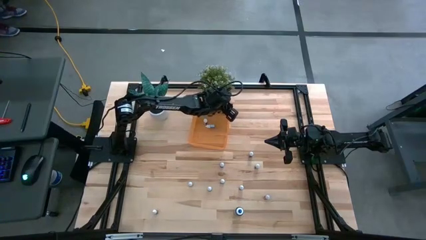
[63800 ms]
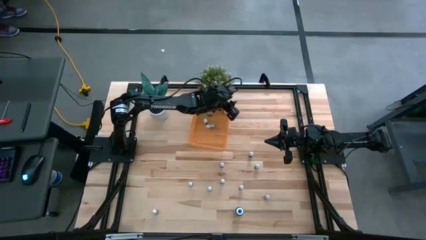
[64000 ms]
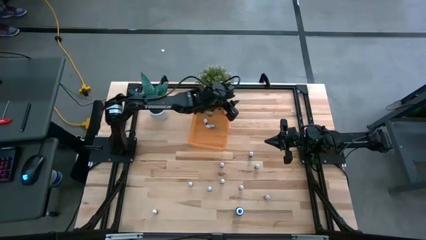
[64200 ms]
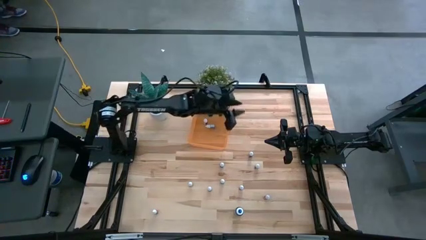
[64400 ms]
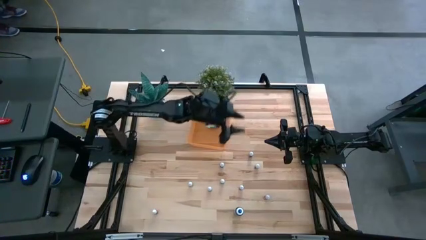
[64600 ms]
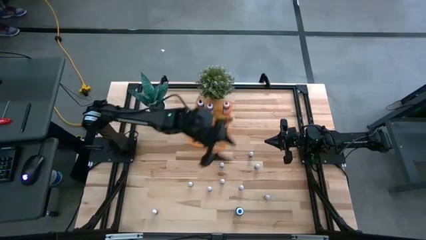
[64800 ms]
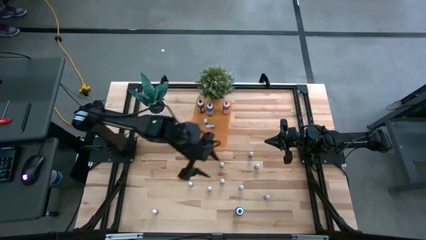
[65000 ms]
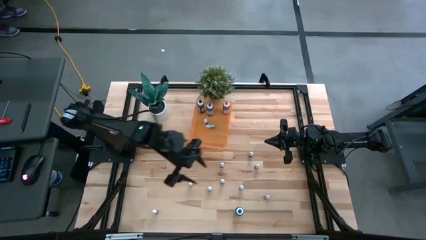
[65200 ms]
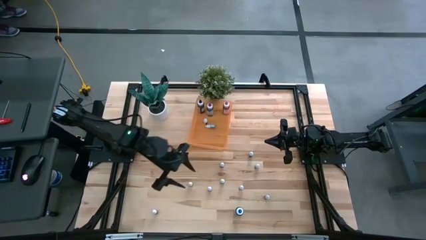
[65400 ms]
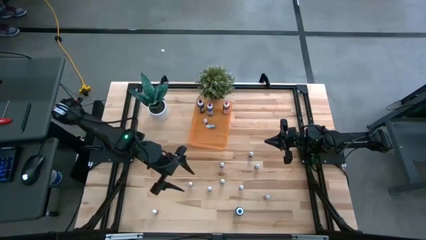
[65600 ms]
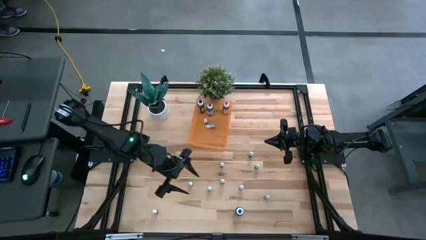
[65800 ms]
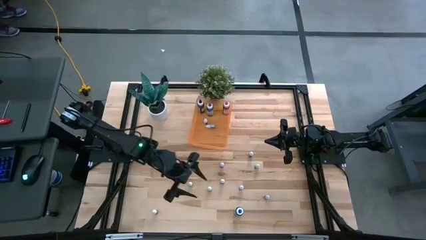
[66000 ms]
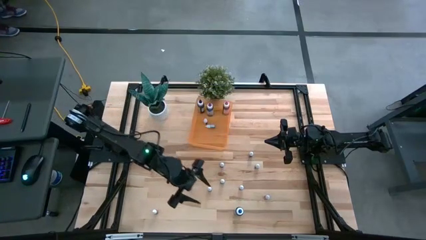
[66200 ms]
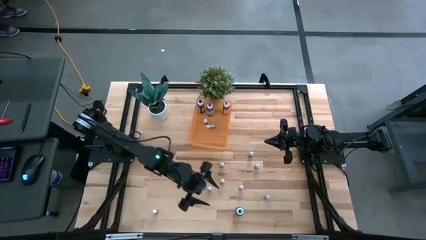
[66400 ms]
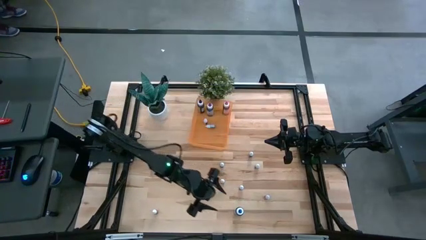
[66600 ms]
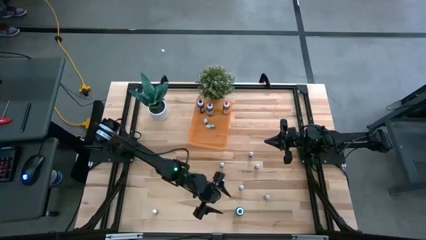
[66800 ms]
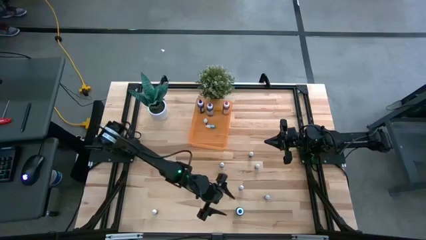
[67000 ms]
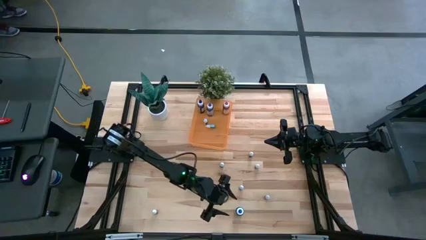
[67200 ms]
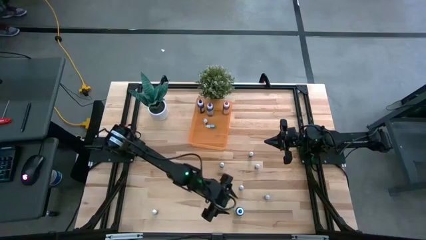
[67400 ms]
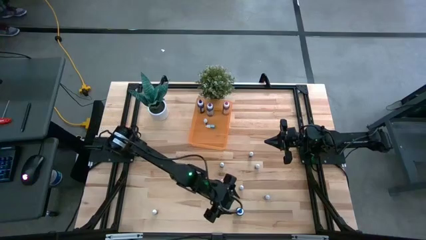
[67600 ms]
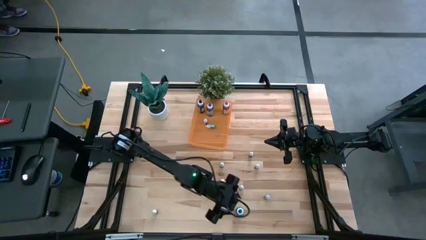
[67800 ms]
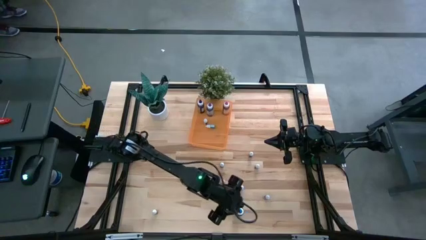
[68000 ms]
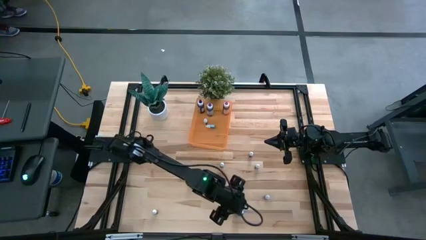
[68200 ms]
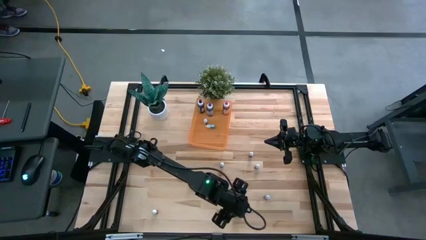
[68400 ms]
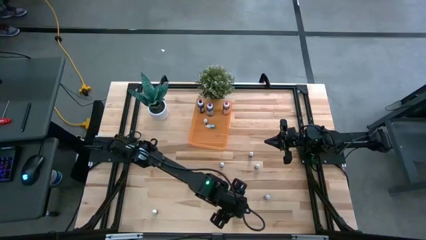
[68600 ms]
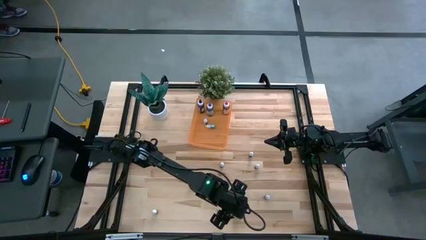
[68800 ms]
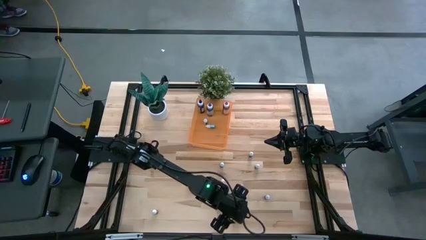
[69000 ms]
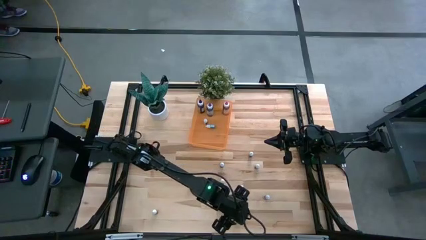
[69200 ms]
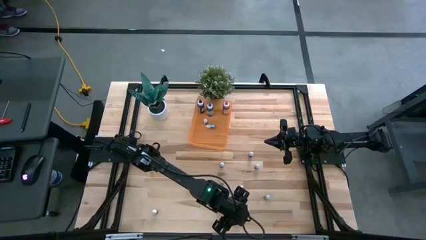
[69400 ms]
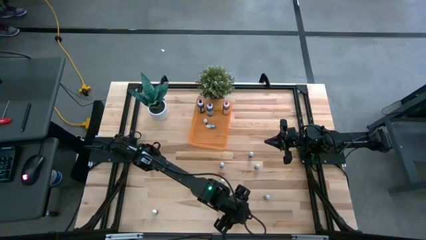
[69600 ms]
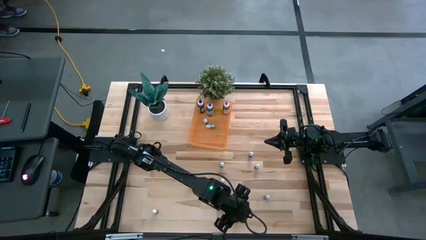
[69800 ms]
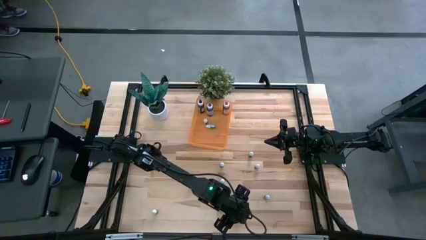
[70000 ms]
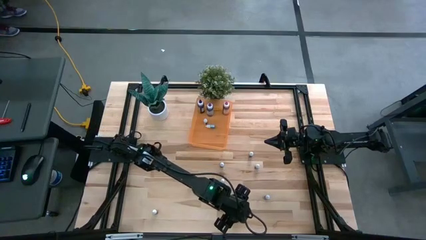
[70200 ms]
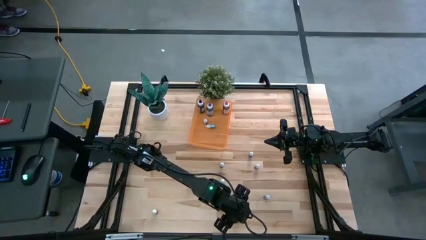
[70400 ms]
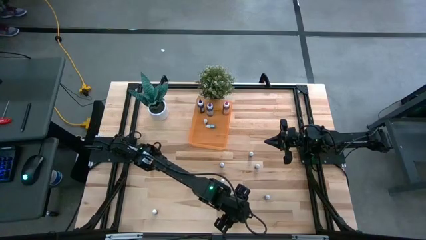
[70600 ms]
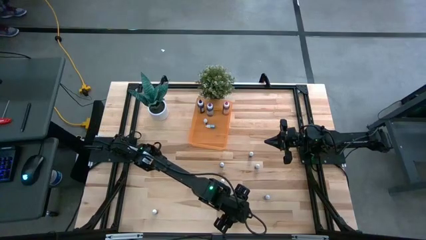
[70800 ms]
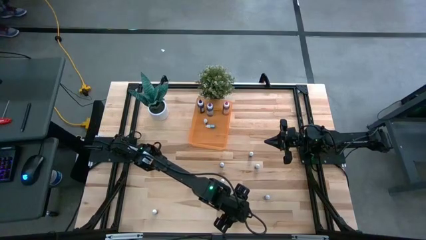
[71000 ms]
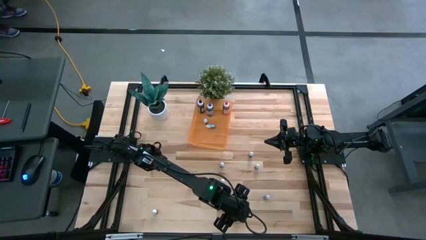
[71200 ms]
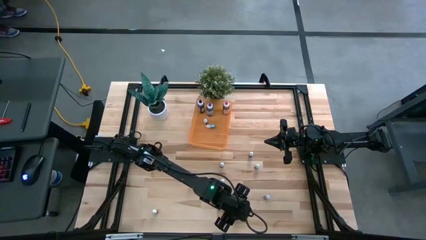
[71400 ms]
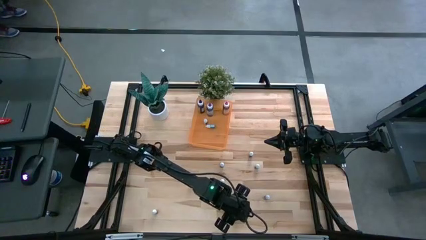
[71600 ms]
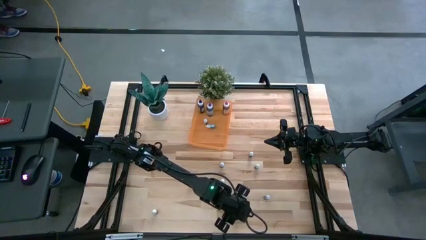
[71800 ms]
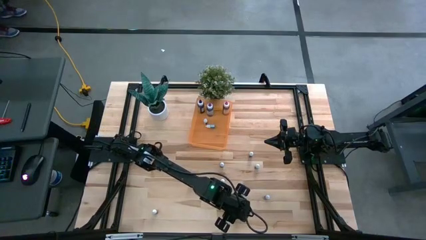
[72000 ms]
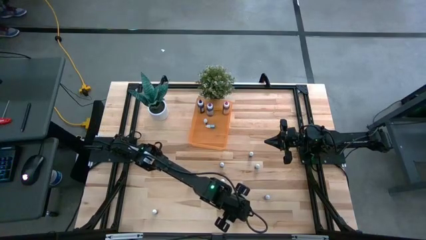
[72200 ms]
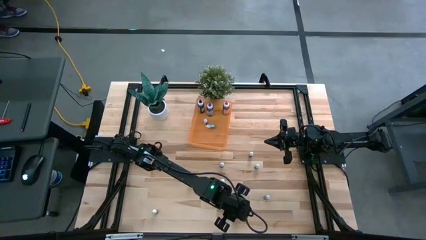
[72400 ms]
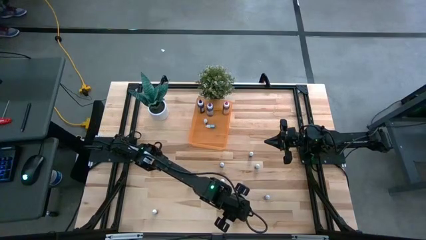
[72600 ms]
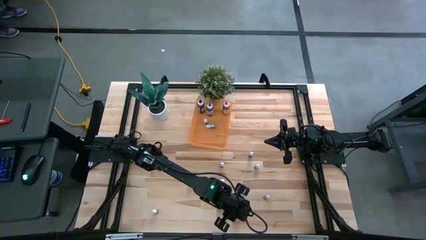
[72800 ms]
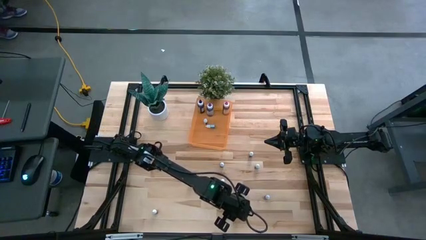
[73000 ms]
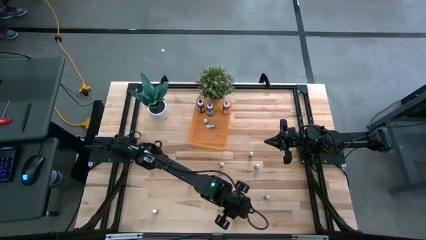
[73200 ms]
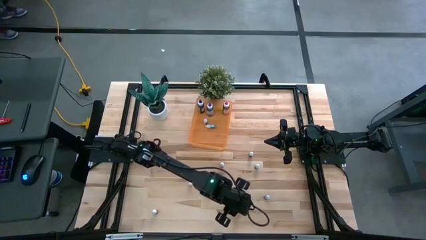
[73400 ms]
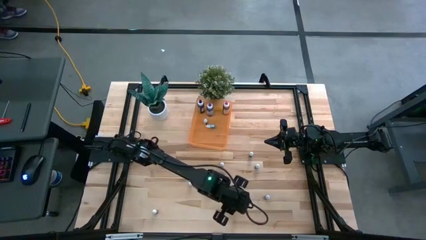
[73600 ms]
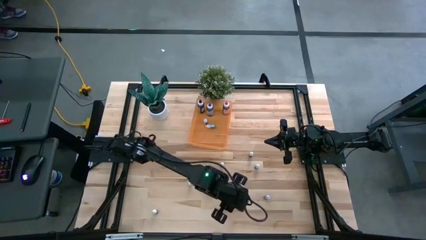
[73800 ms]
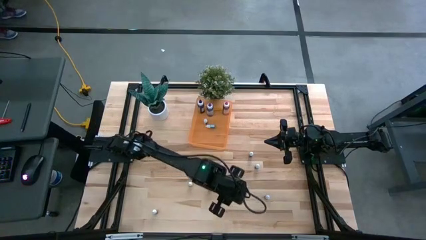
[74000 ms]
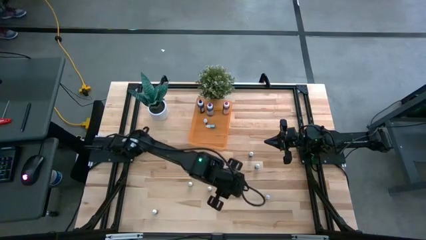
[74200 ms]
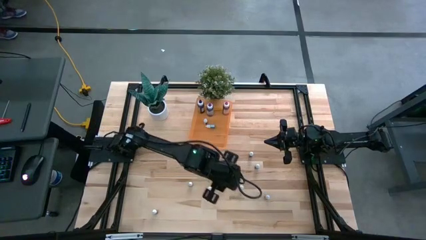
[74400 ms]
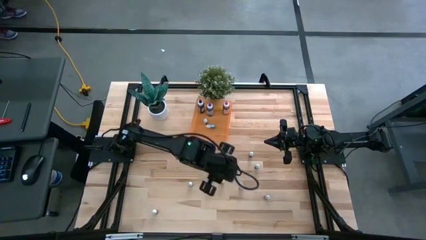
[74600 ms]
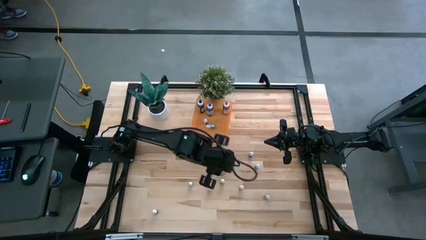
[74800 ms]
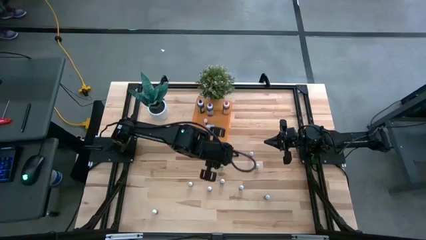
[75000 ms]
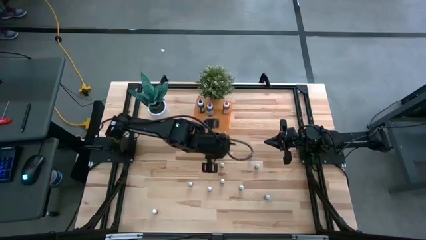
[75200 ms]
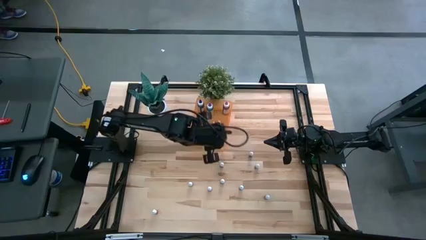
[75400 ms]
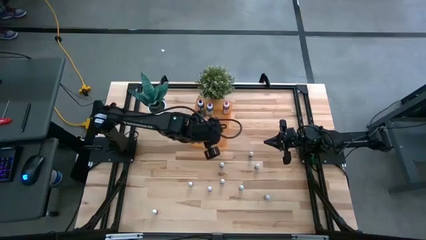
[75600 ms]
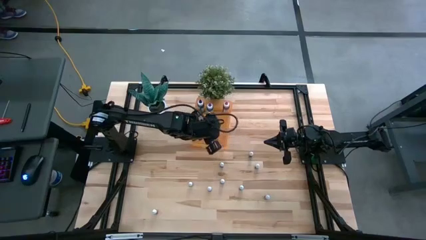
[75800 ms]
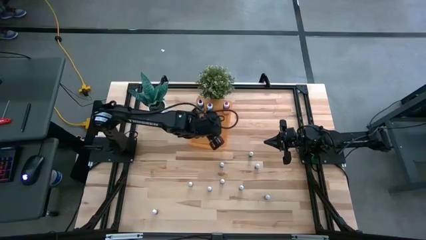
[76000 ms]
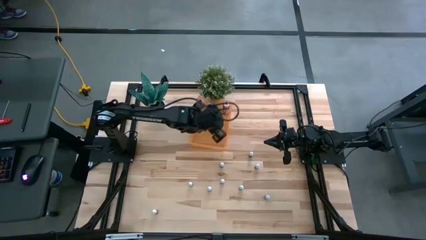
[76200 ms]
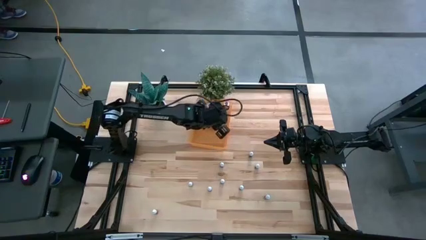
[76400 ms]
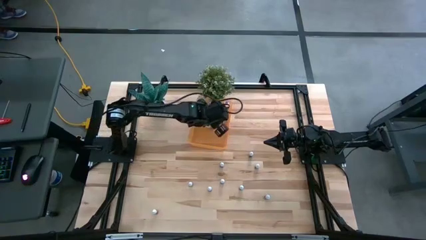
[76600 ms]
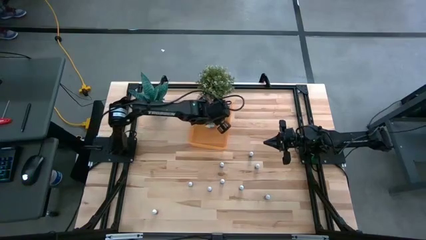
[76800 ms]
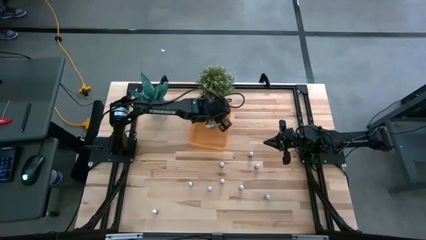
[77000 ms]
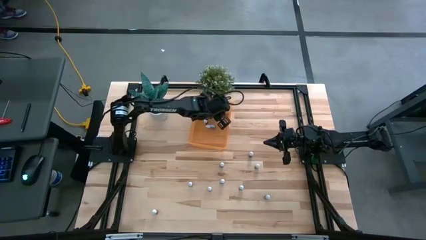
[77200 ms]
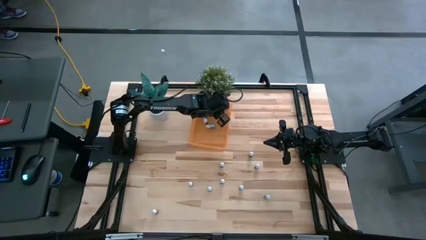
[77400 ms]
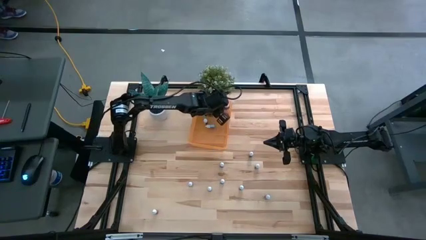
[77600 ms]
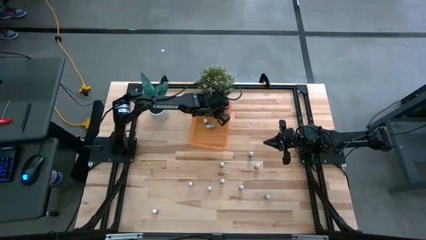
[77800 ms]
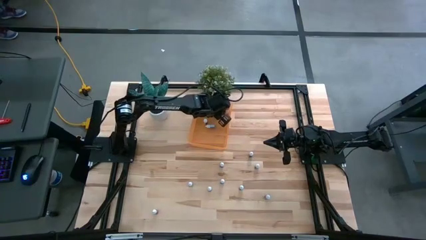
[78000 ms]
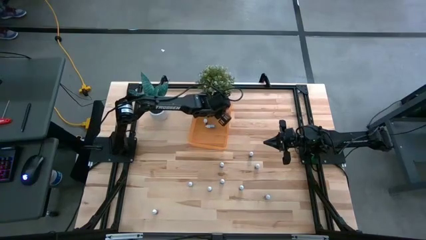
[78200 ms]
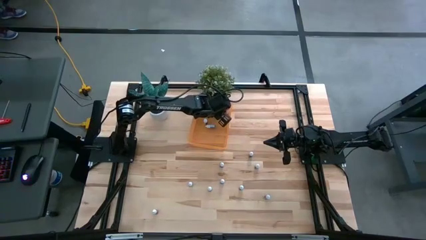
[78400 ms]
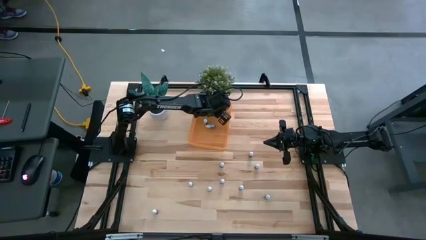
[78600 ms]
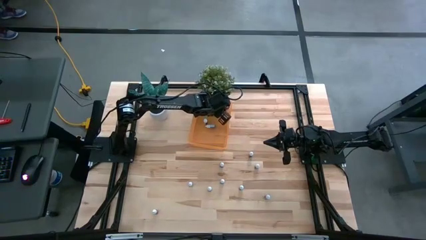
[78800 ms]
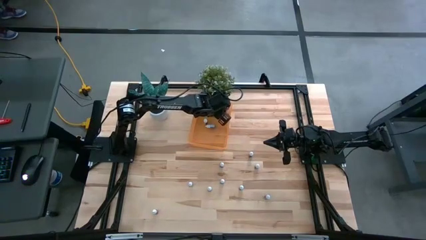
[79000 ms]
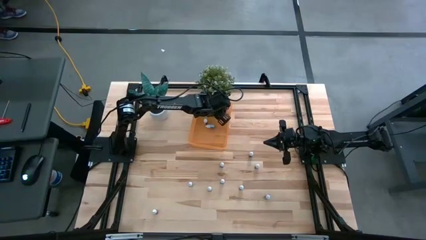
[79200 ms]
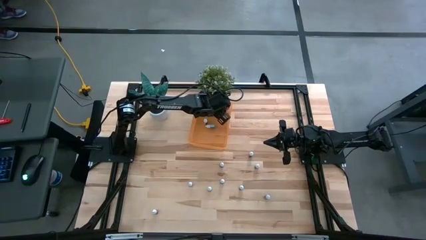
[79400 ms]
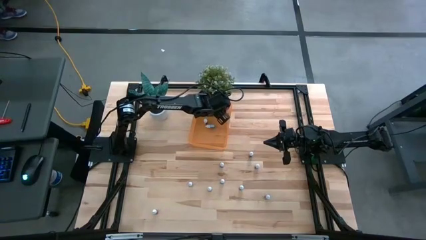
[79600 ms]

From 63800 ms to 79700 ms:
Task: Pick & Place food coloring
Put the large blue food coloring bottle into the orange bin
